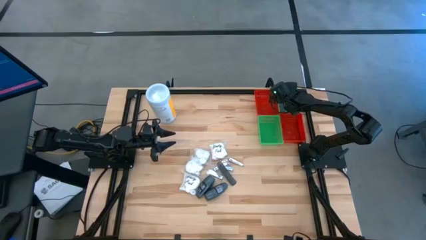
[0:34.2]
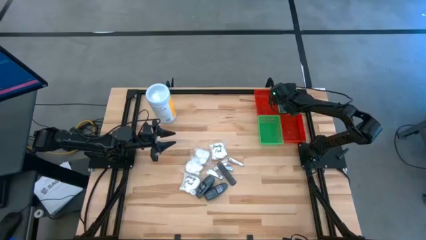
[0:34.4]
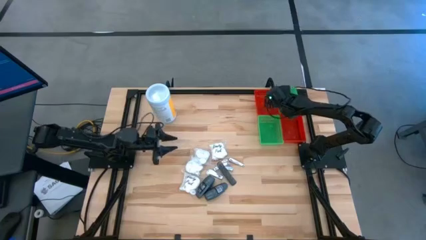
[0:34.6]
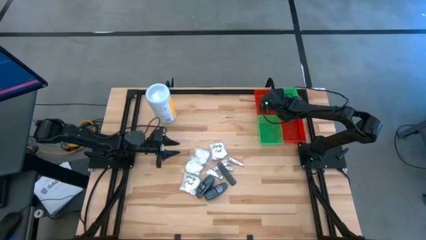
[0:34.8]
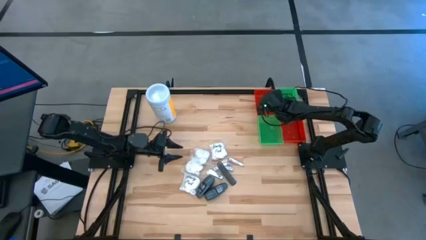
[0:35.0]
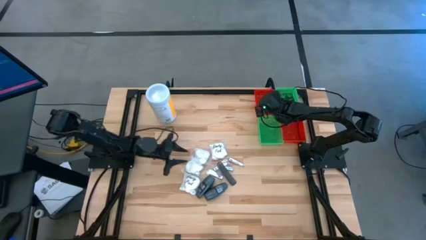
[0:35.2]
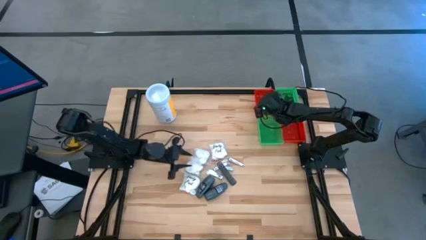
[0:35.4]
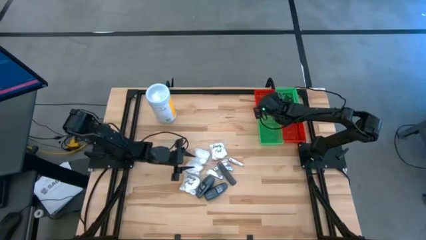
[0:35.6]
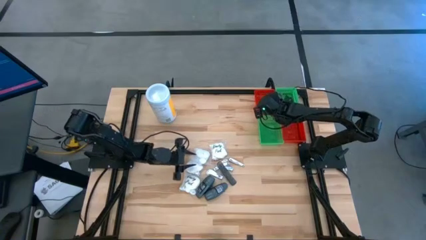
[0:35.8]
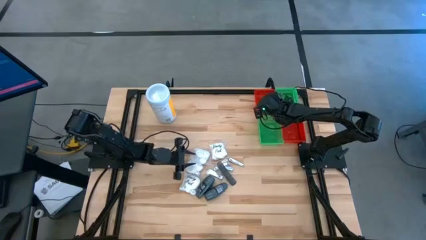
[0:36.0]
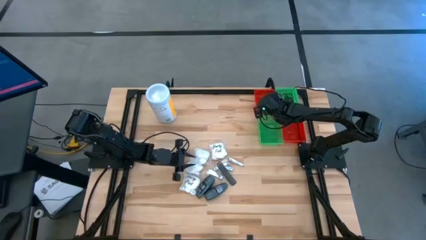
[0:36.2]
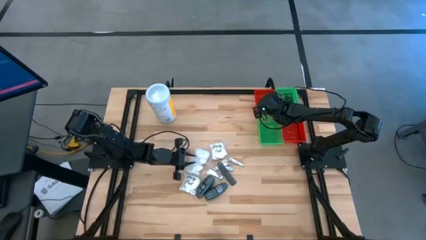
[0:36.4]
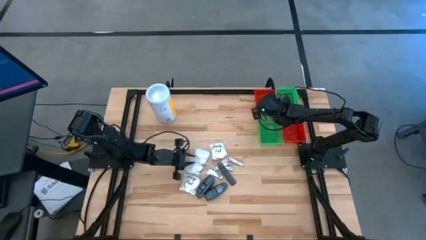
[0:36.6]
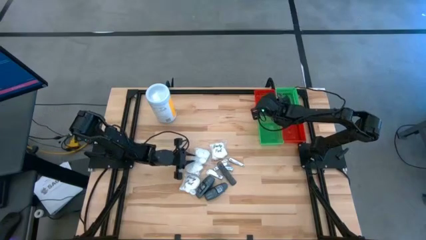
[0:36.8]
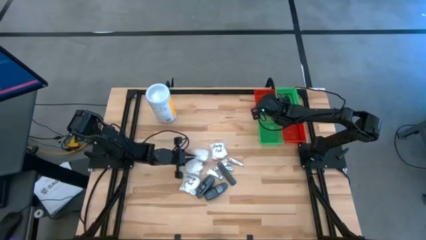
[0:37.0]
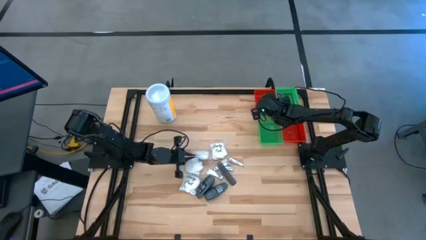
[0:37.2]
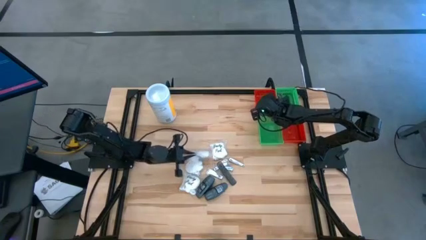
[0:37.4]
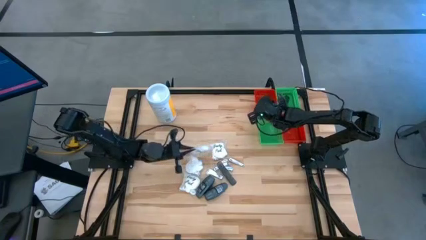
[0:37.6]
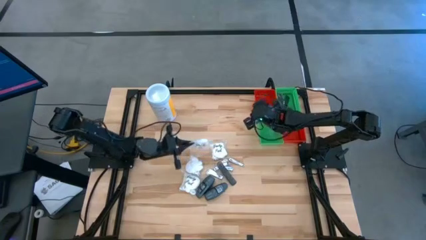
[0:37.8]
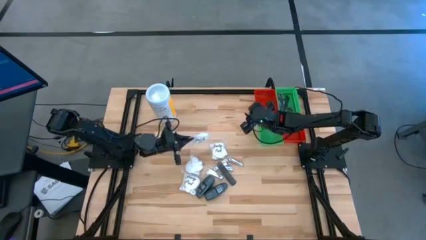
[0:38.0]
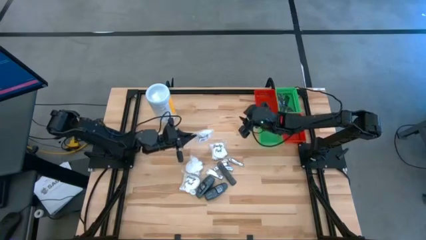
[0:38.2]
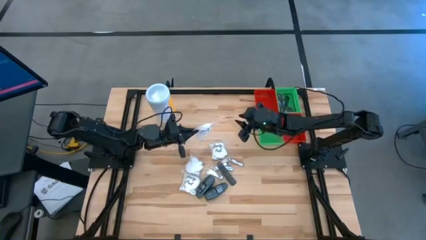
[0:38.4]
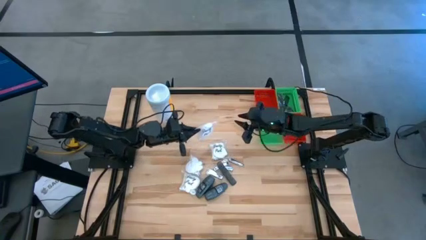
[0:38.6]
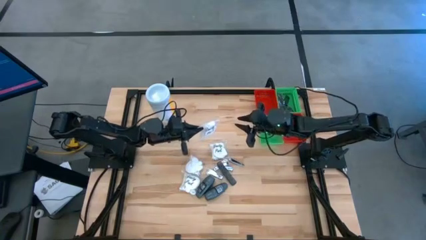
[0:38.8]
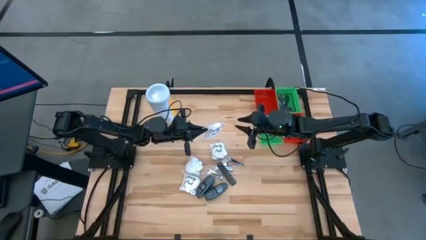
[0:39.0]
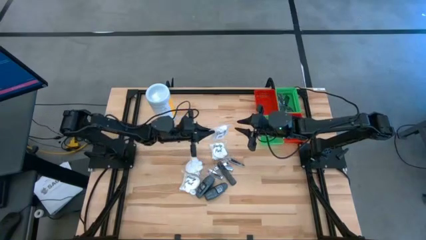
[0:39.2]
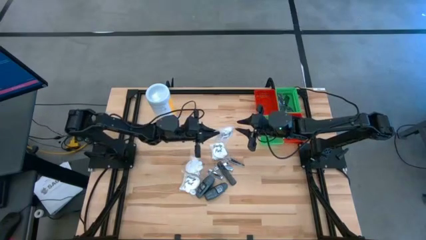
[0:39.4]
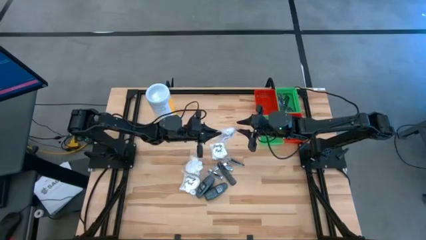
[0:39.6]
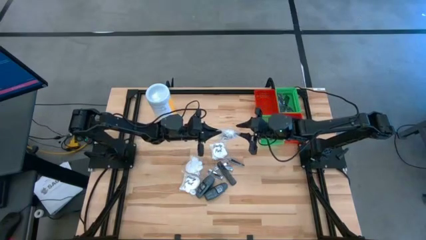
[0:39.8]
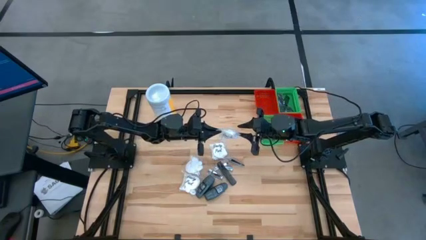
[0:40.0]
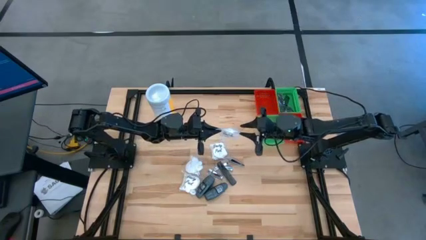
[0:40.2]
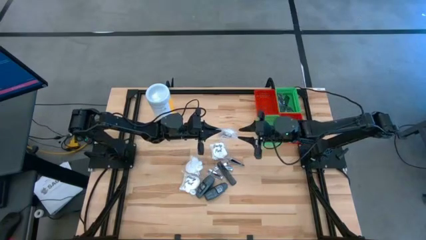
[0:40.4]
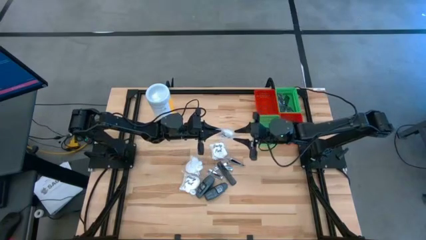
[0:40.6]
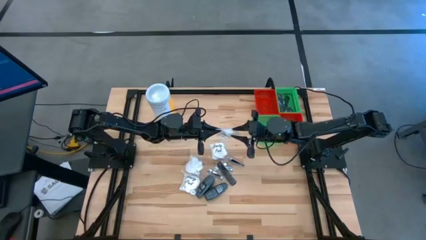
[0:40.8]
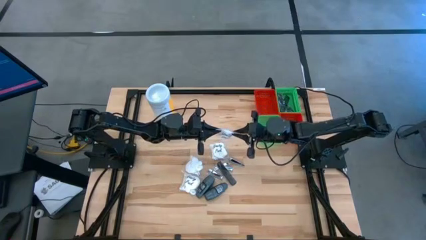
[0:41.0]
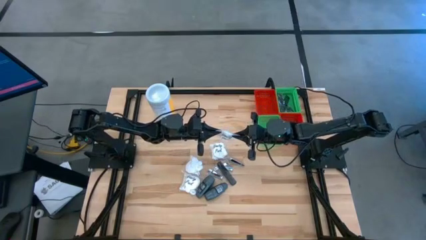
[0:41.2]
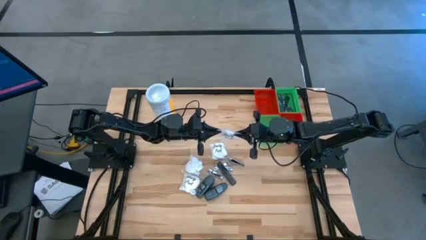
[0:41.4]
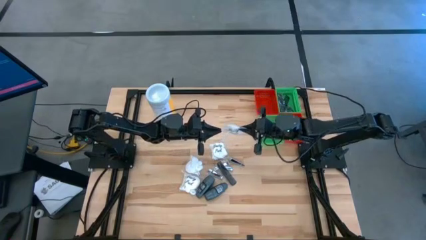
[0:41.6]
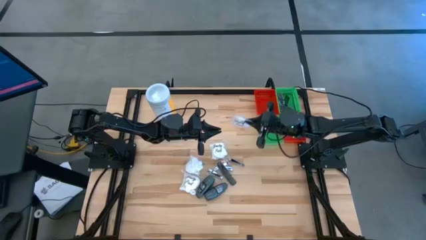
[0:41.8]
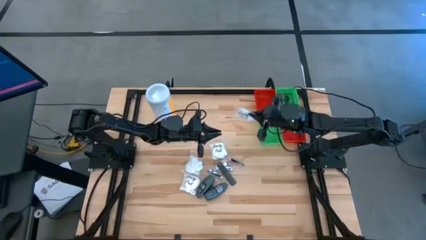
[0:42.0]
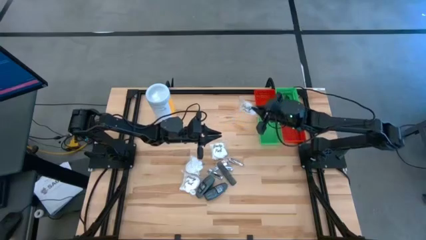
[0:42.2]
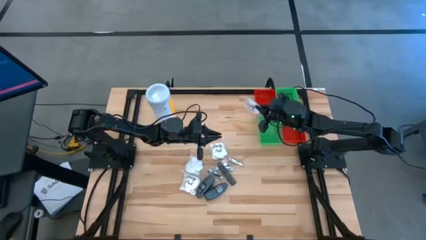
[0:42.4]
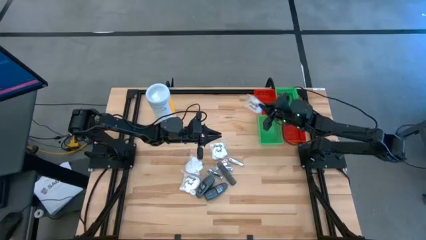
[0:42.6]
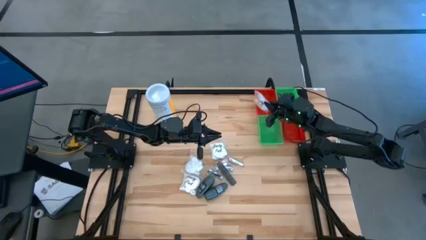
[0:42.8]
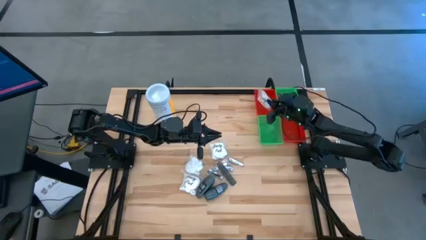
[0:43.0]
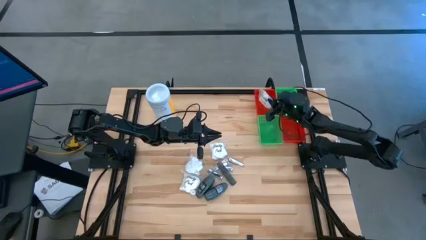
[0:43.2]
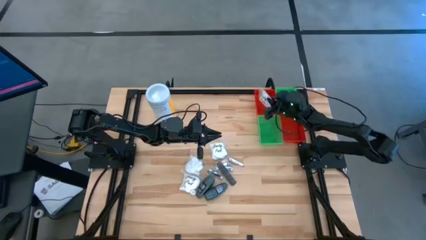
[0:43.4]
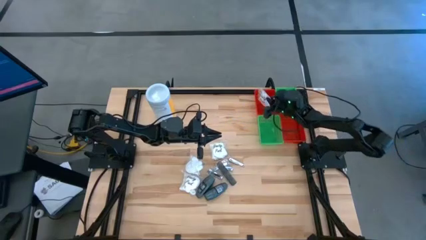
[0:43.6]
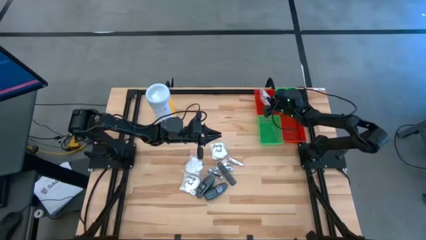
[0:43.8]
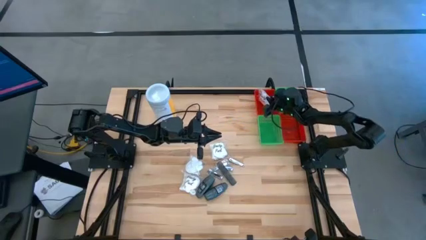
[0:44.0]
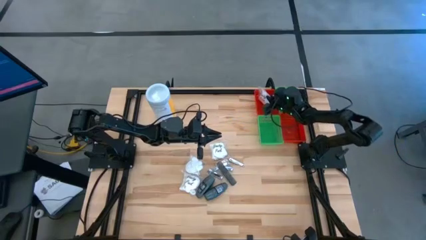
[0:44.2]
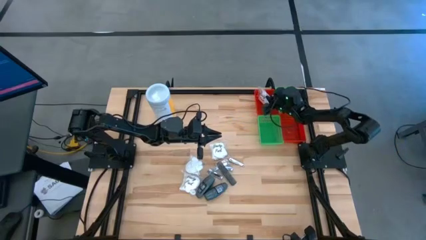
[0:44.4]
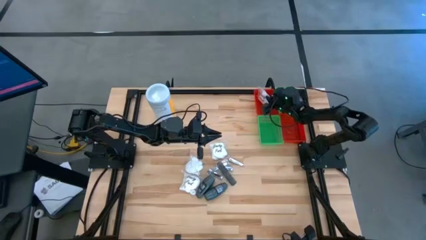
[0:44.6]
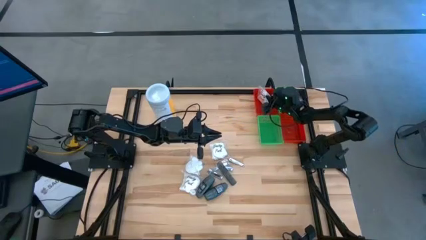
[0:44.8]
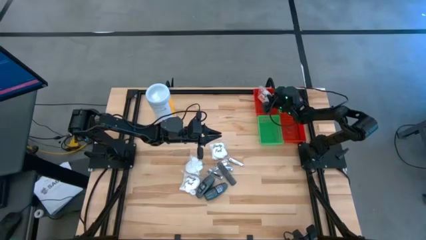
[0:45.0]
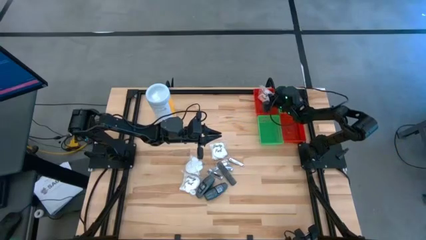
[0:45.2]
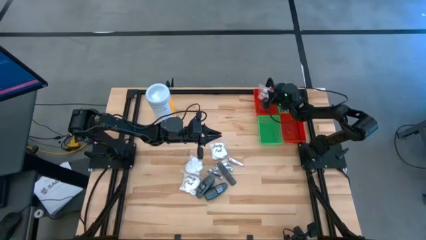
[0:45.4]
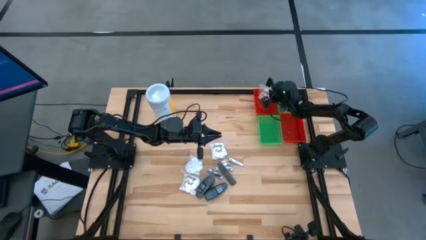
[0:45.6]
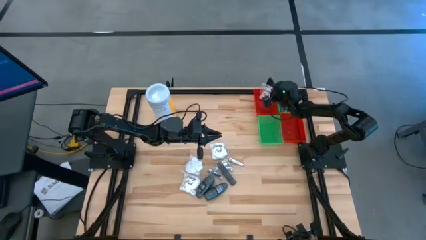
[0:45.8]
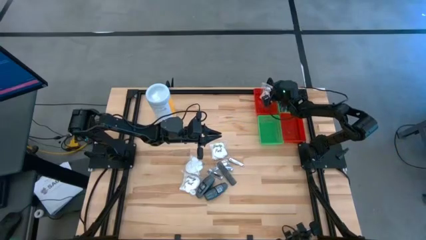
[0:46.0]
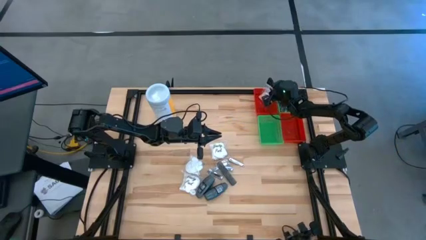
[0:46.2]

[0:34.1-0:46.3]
Task: Pick & Place Travel size toiletries
Put the white cotton pack into the top red bin
